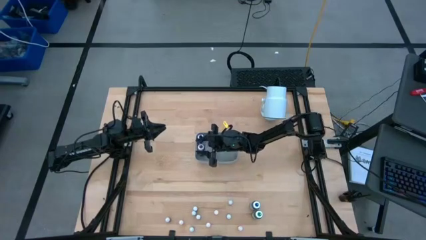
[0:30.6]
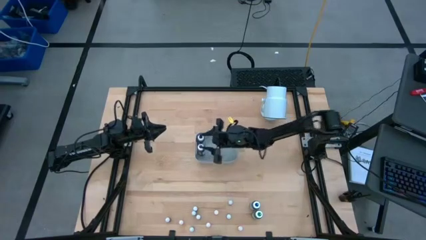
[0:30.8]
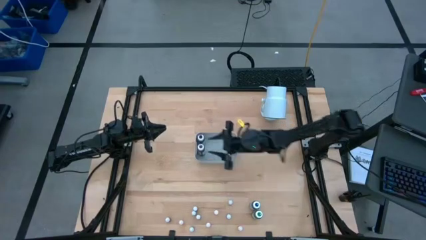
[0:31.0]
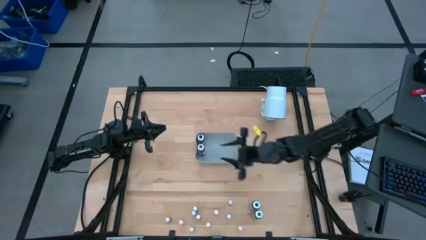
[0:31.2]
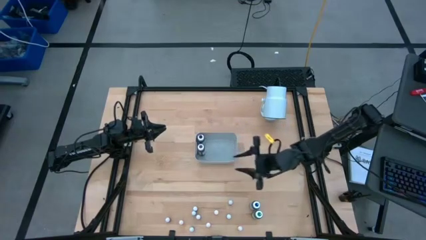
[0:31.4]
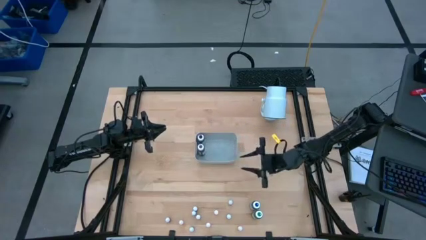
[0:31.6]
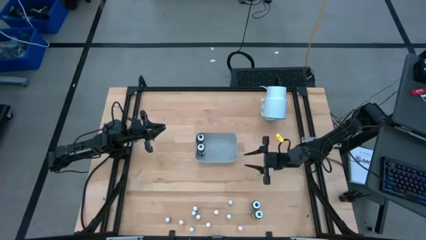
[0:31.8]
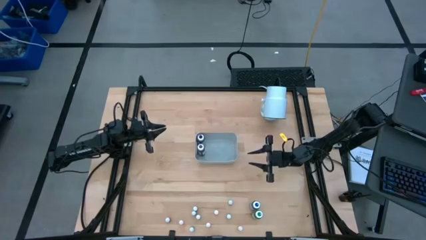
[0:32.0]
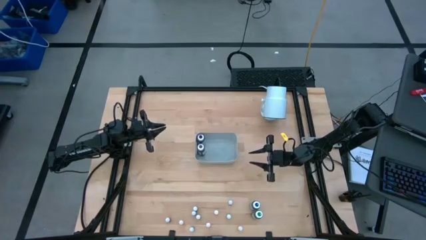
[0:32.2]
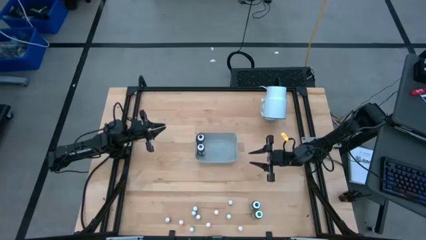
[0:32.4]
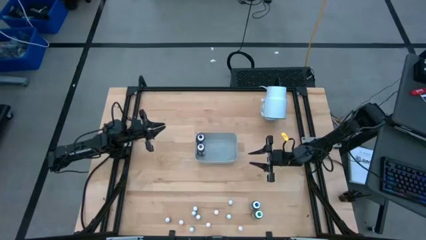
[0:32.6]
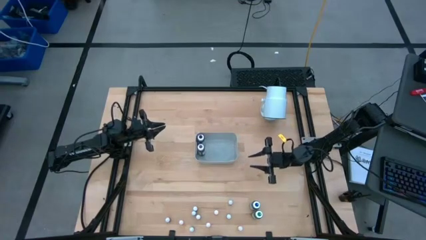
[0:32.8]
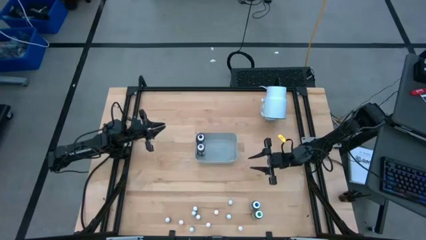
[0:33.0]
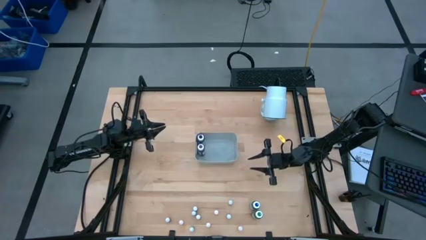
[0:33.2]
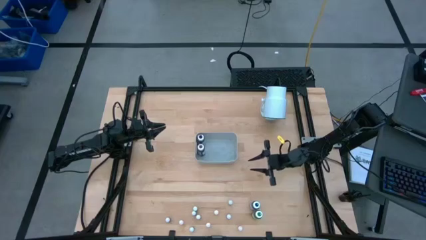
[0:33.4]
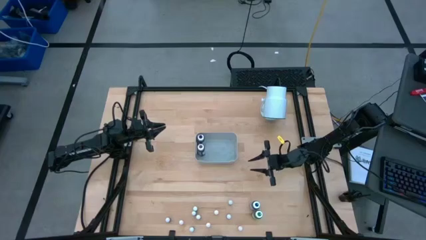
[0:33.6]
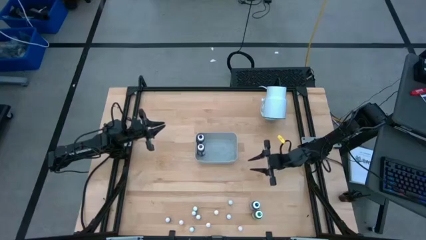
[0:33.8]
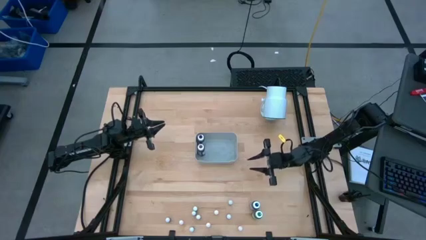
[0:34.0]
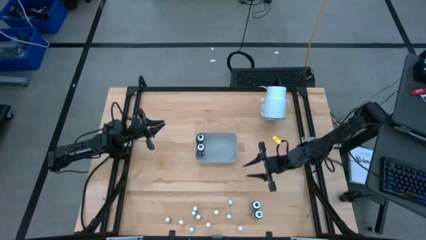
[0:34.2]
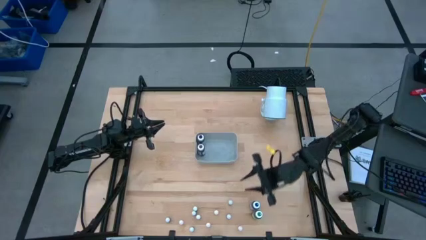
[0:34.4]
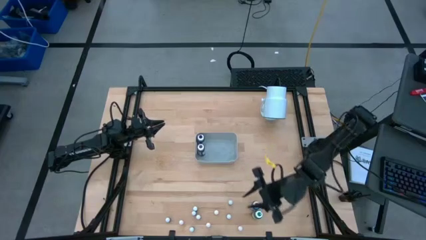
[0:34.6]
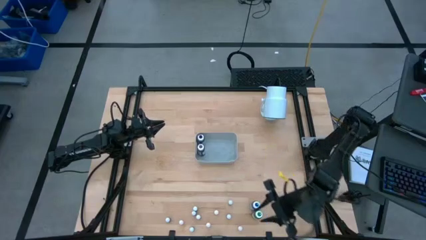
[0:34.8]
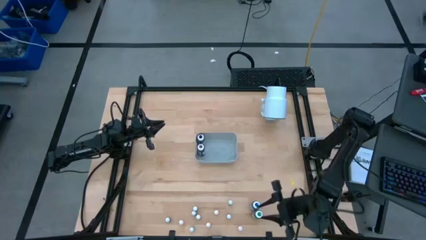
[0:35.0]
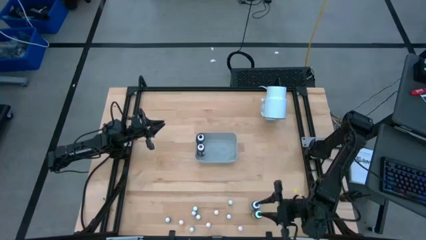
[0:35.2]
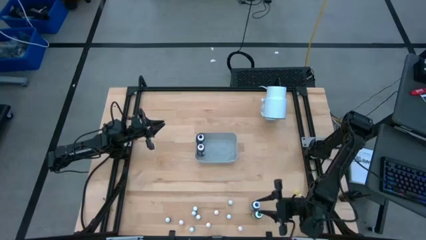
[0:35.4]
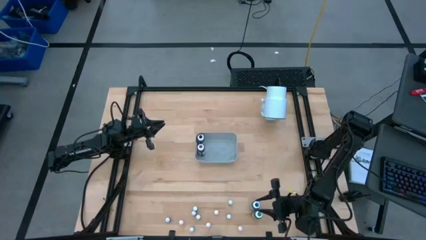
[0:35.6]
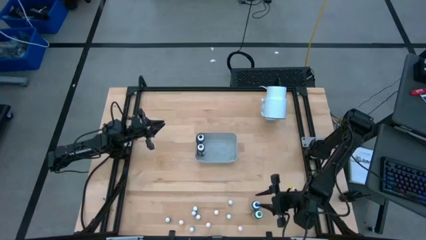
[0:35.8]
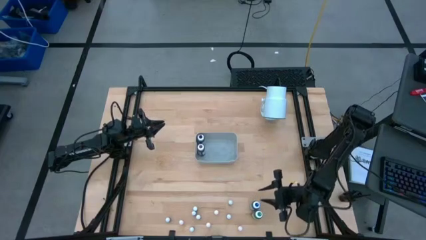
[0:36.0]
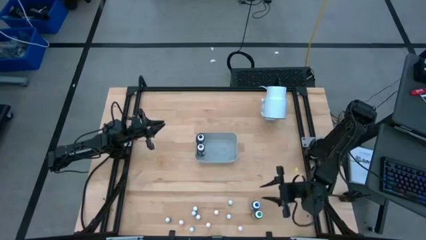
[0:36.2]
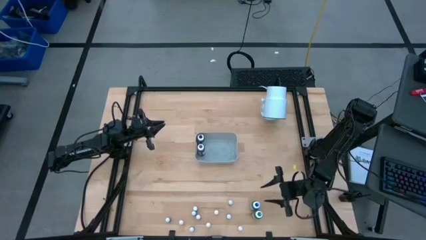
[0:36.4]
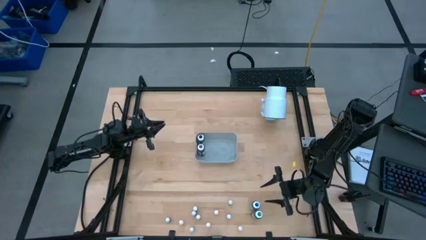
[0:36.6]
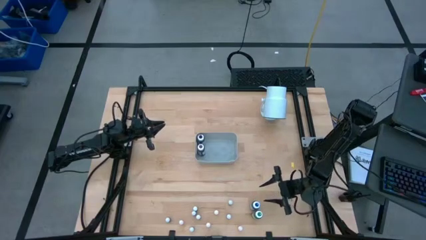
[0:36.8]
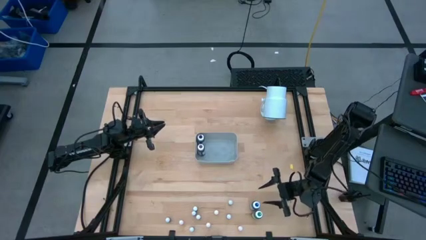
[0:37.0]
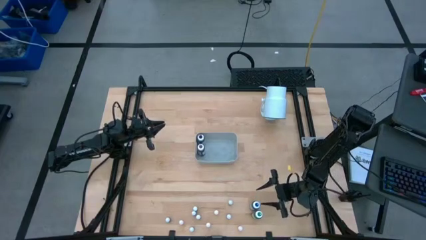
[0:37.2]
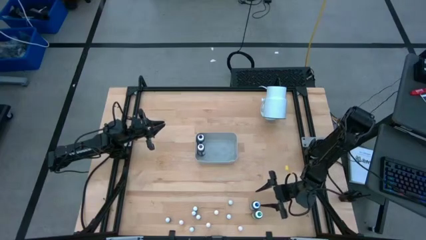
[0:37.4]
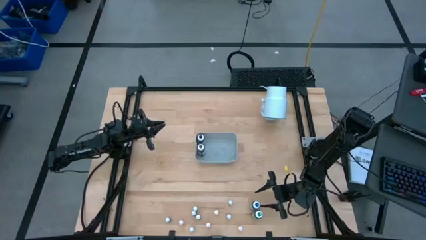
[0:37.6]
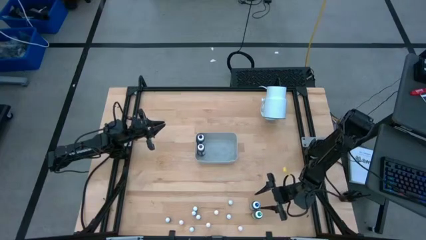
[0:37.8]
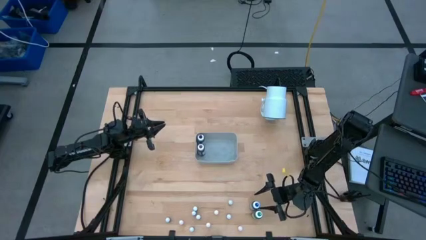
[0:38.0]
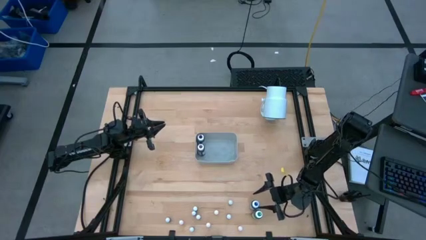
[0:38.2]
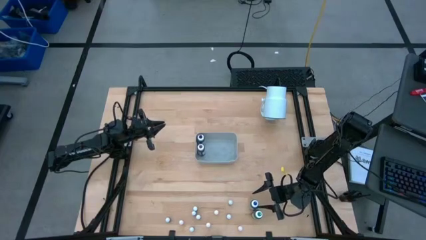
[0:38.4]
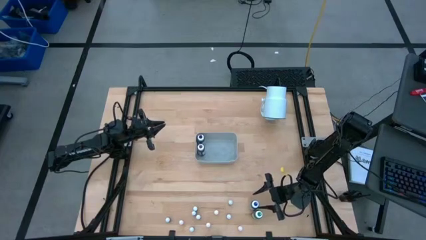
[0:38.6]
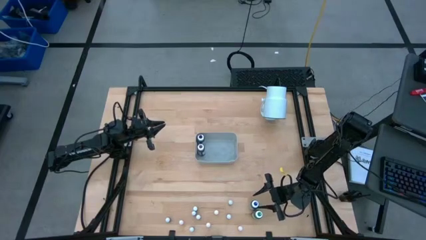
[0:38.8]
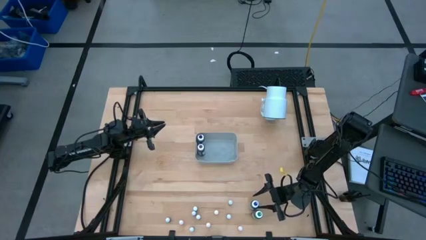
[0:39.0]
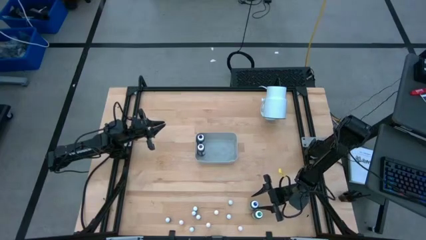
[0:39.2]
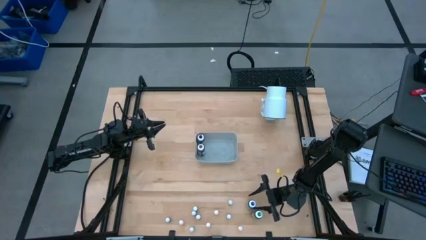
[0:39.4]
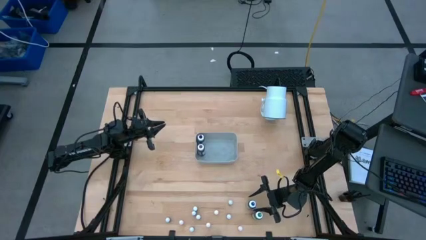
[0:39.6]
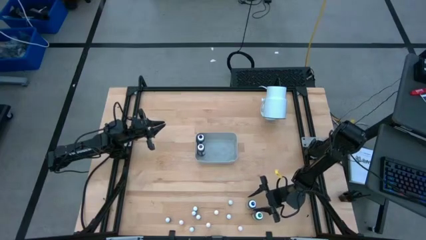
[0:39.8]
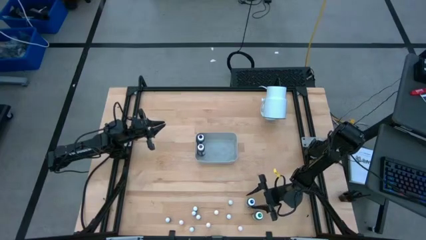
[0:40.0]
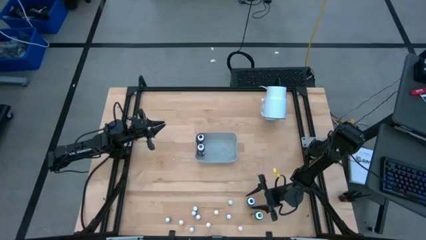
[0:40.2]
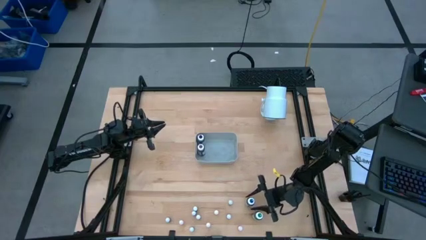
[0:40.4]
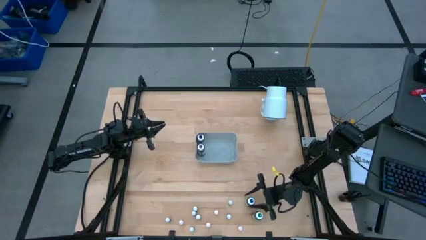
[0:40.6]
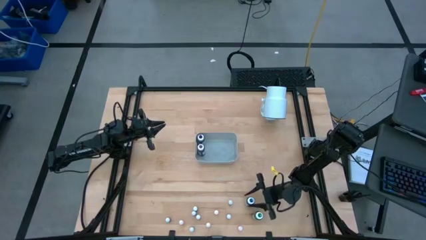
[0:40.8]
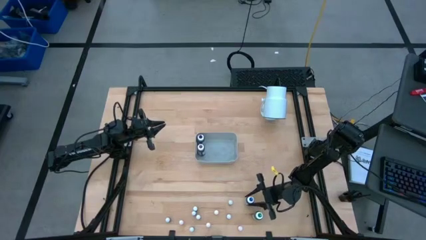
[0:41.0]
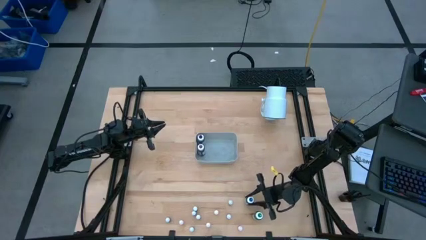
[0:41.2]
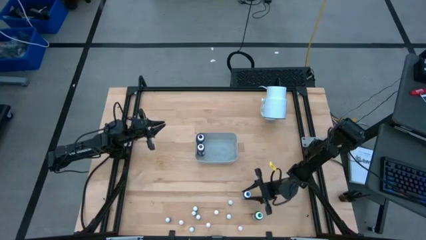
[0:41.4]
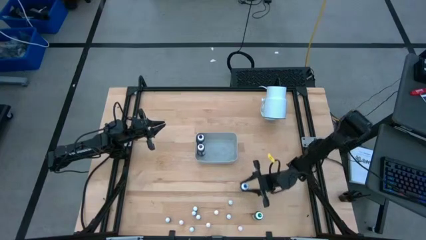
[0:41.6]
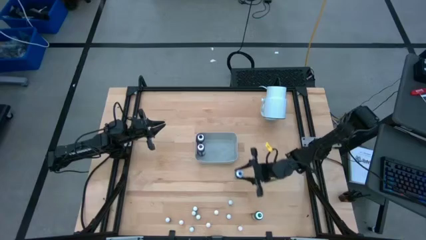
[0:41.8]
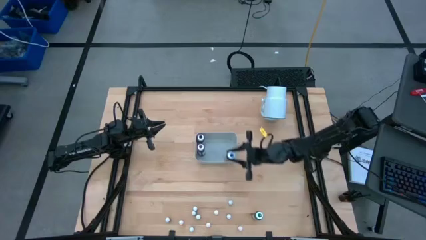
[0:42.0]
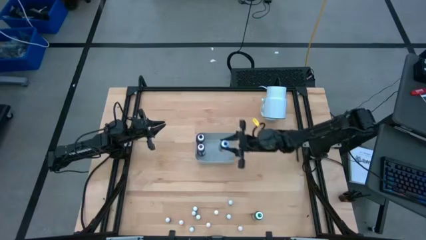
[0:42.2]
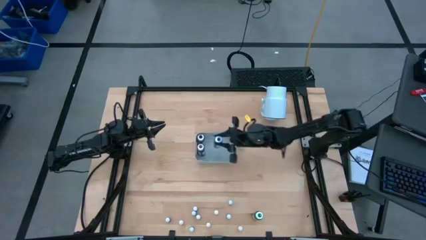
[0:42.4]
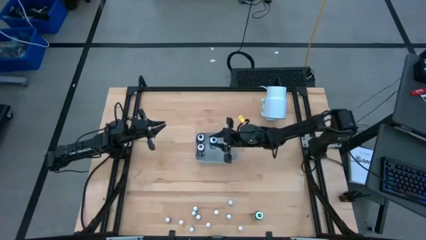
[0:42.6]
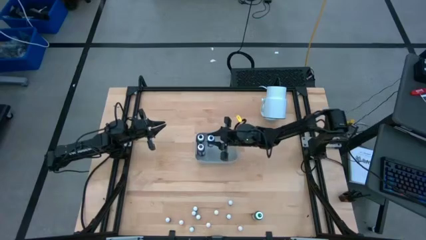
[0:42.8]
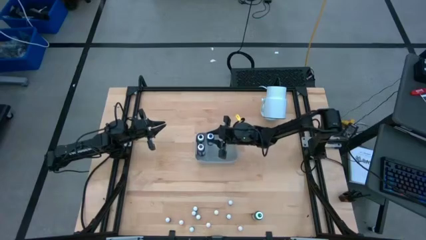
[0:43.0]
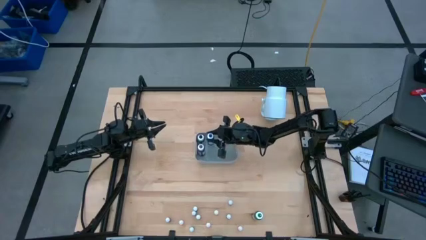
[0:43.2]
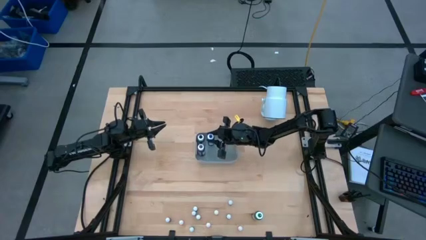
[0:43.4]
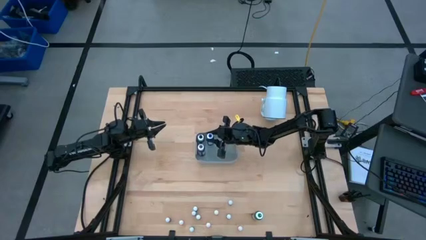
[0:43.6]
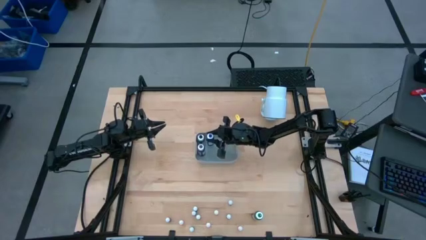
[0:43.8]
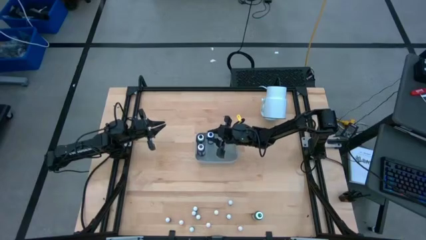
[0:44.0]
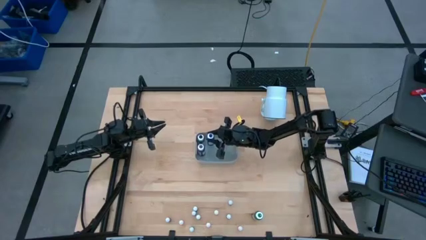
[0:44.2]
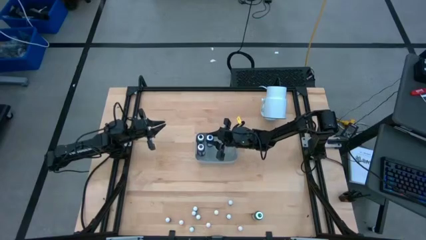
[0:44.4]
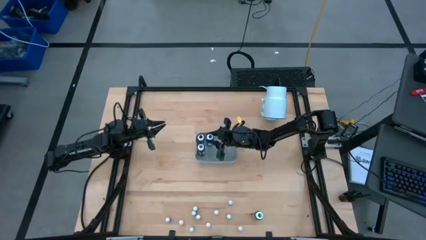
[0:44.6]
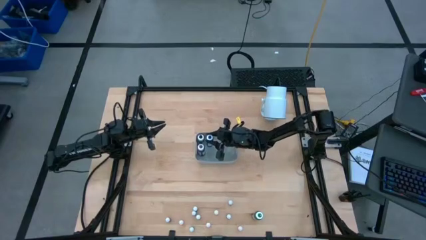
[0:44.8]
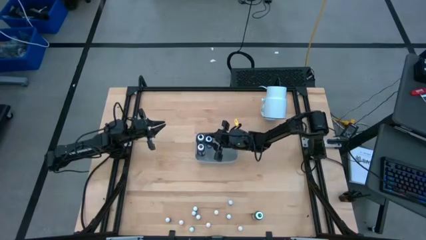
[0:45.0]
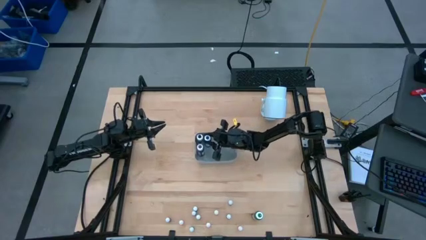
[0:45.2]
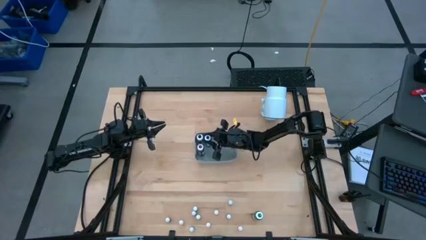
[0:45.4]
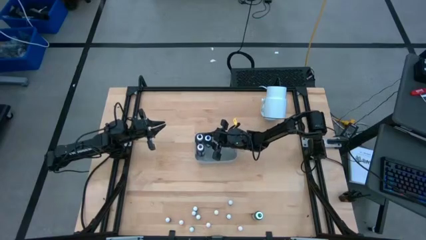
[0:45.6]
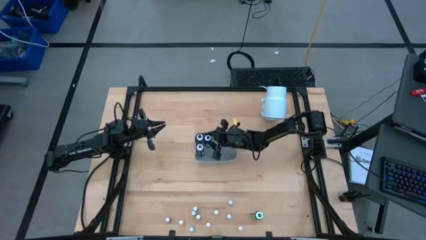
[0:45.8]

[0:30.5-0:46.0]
Task: Pick & Place food coloring
Put the large blue food coloring bottle into the white bin

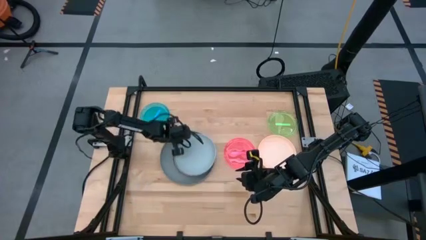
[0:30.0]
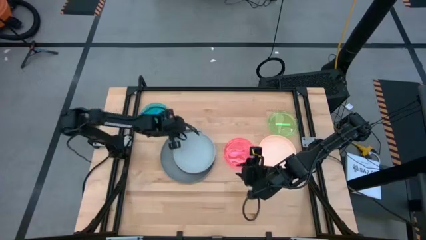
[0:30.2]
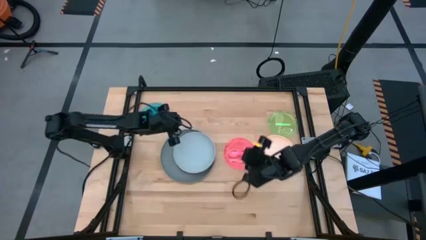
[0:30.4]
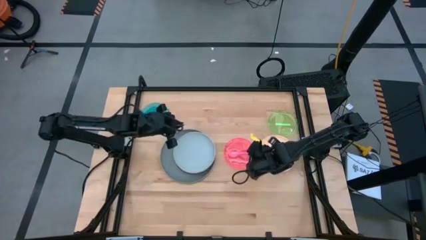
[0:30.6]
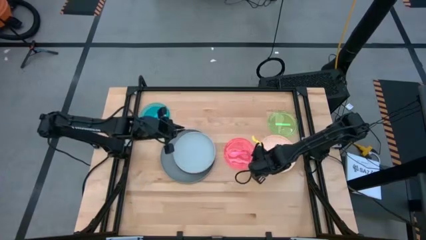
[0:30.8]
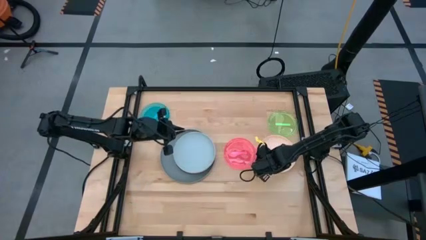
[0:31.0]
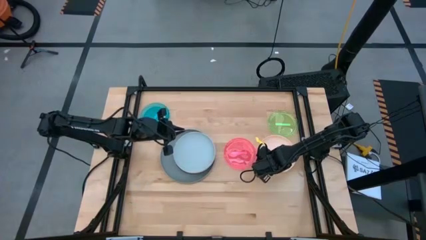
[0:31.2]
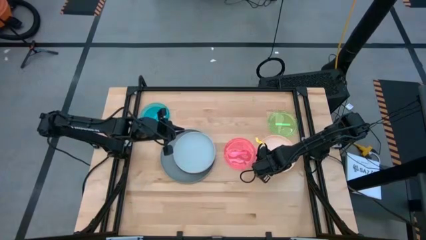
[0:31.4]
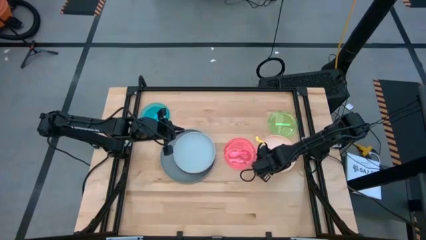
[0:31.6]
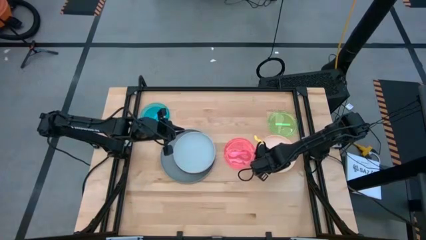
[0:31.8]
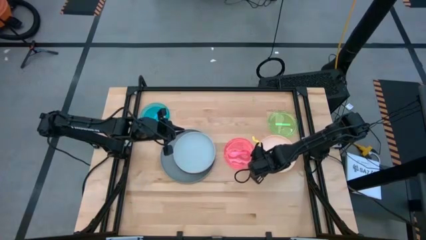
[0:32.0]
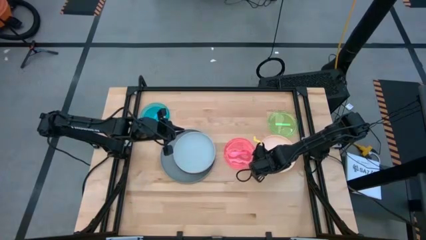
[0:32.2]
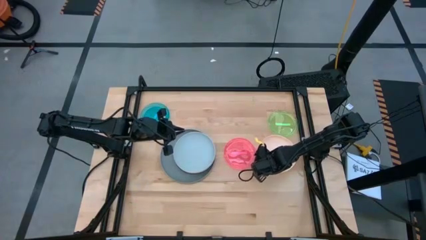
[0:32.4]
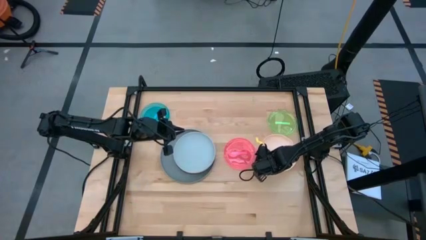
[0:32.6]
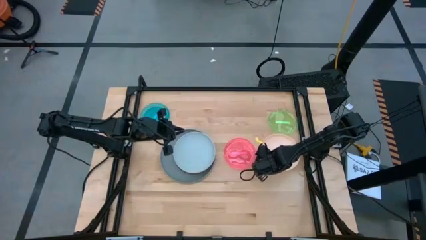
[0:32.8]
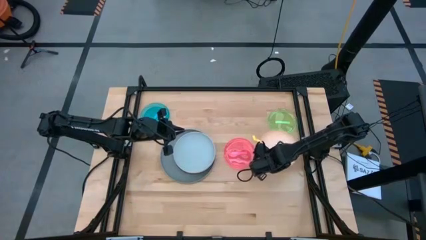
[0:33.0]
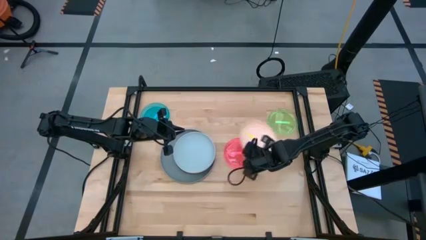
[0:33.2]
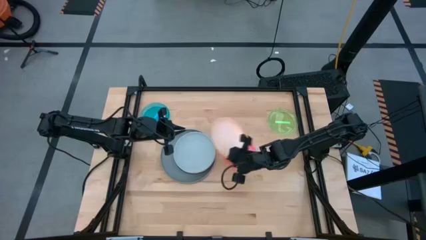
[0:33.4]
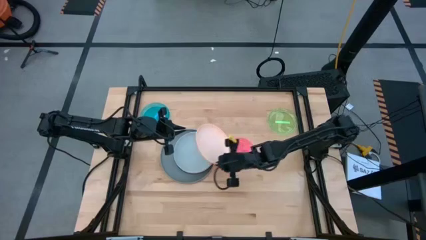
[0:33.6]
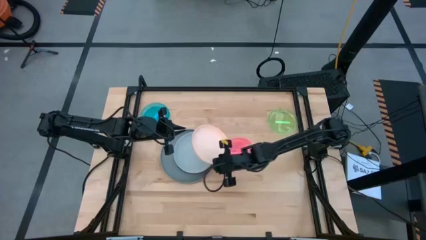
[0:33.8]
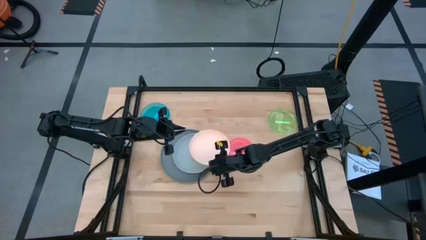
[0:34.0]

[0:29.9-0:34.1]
Task: Stack plastic plates
Stack the light pink plate on top of the light blue plate
